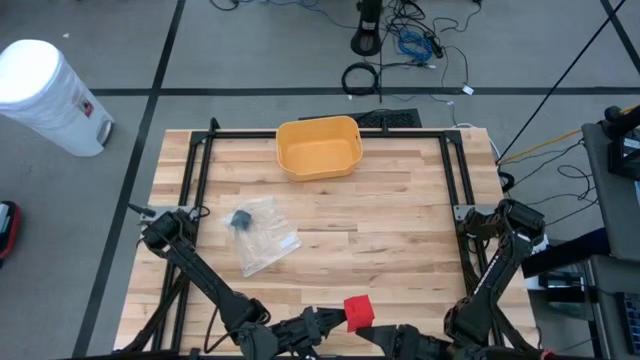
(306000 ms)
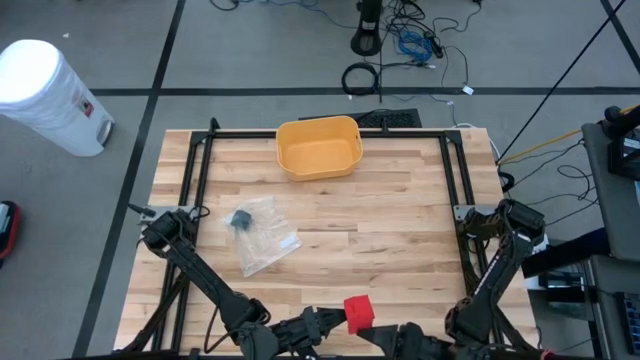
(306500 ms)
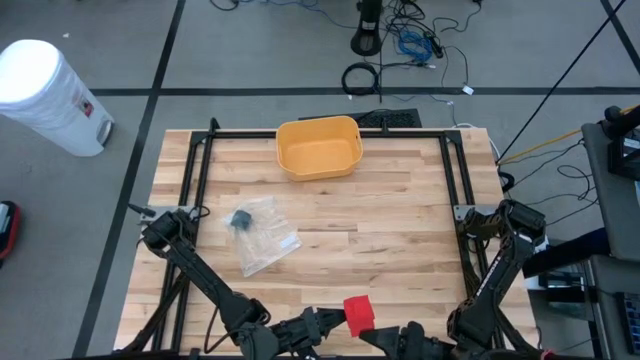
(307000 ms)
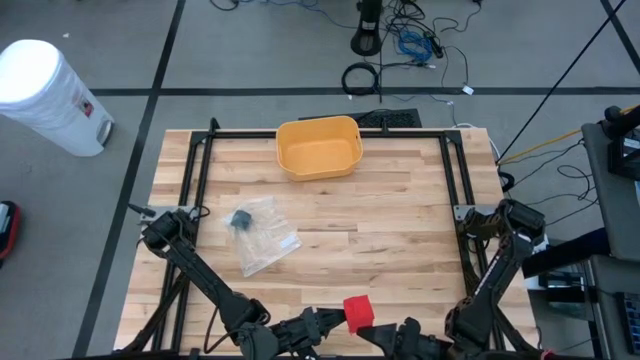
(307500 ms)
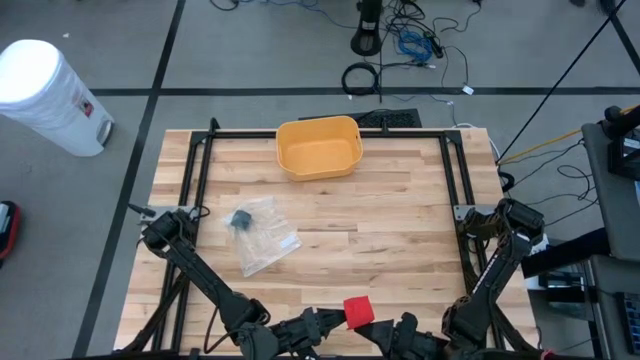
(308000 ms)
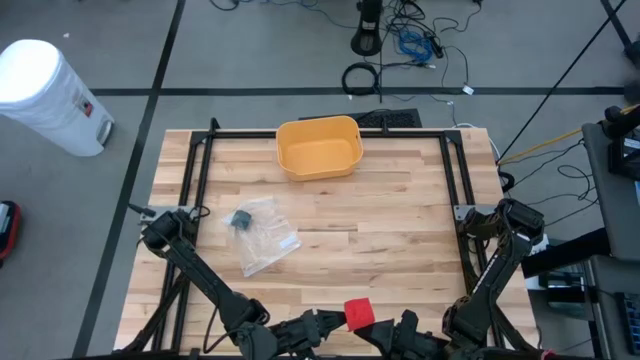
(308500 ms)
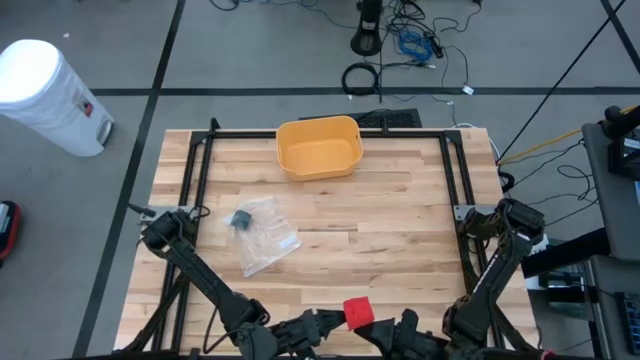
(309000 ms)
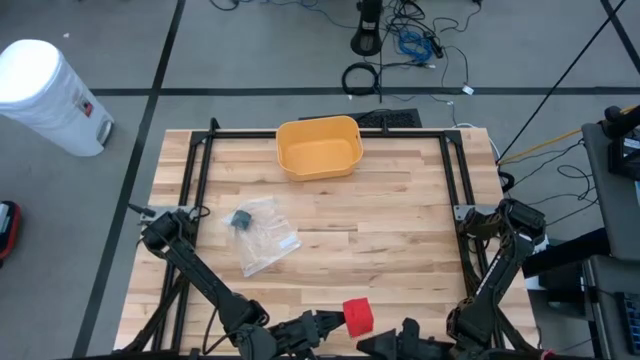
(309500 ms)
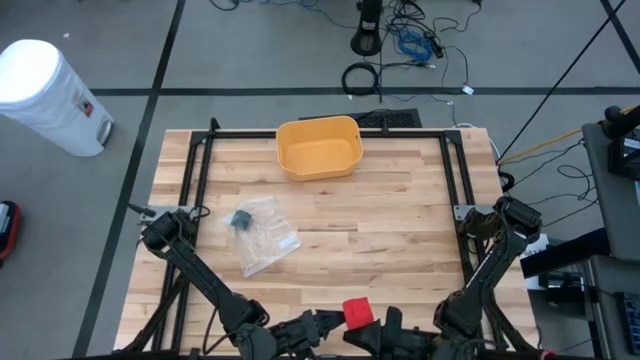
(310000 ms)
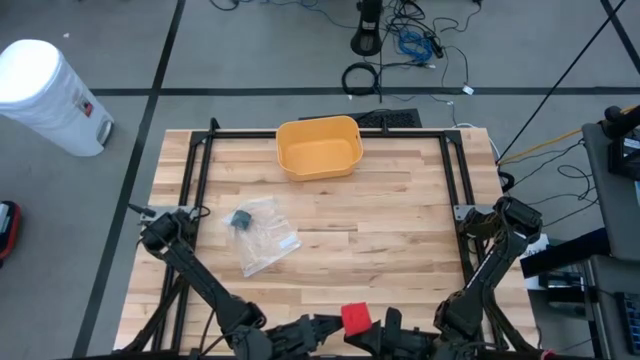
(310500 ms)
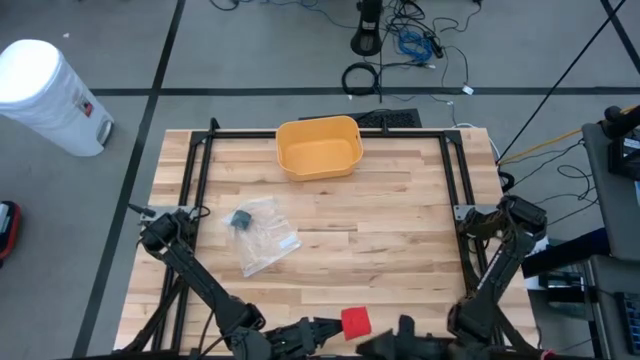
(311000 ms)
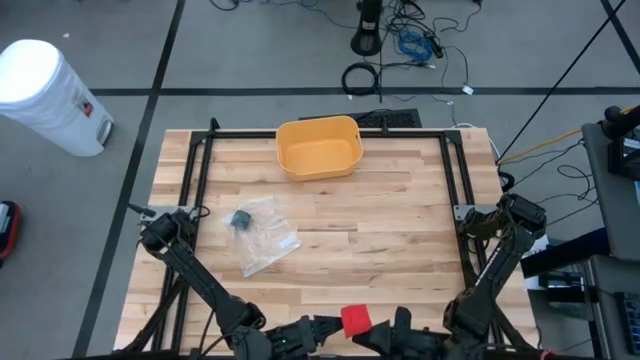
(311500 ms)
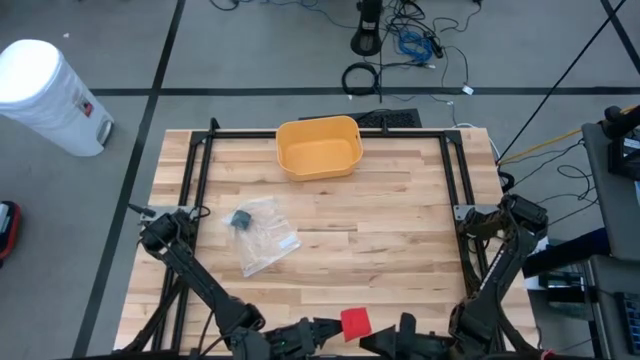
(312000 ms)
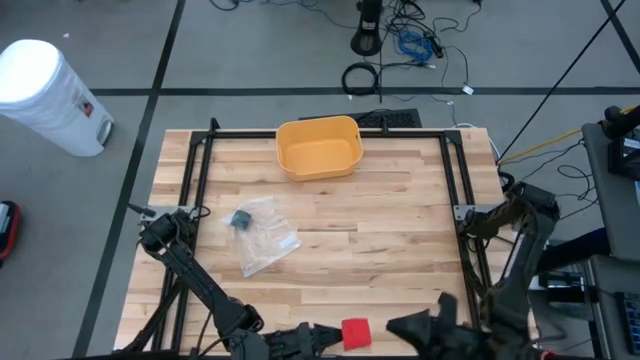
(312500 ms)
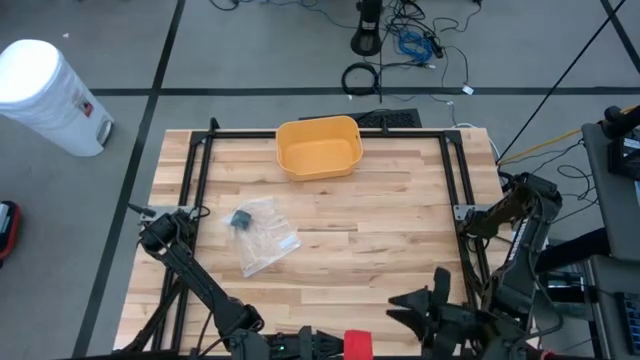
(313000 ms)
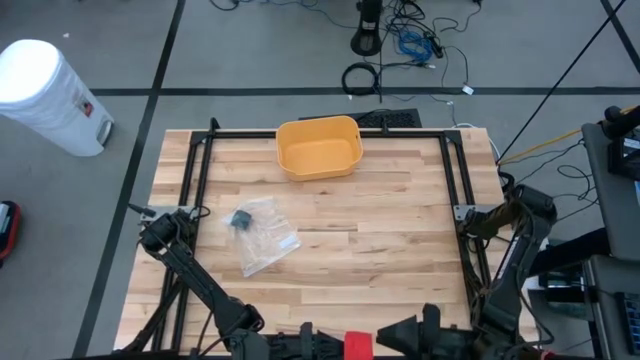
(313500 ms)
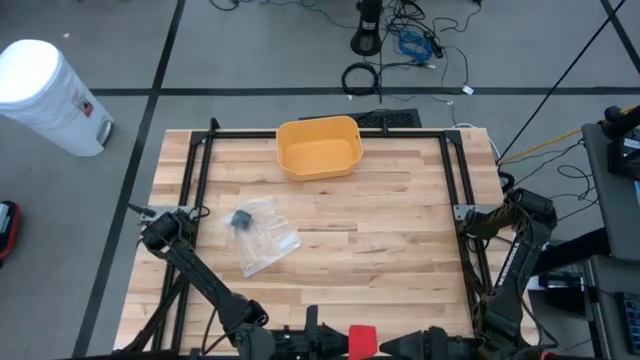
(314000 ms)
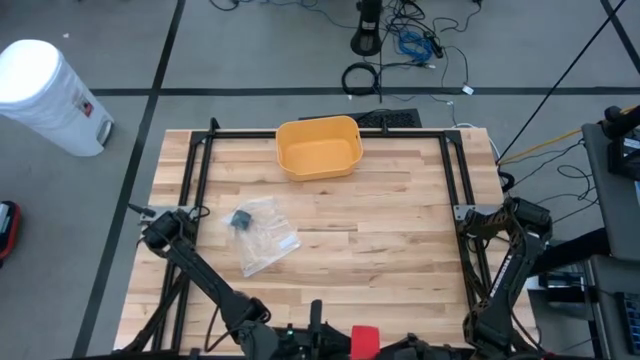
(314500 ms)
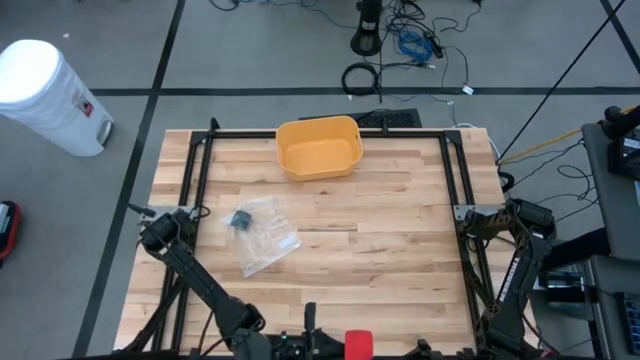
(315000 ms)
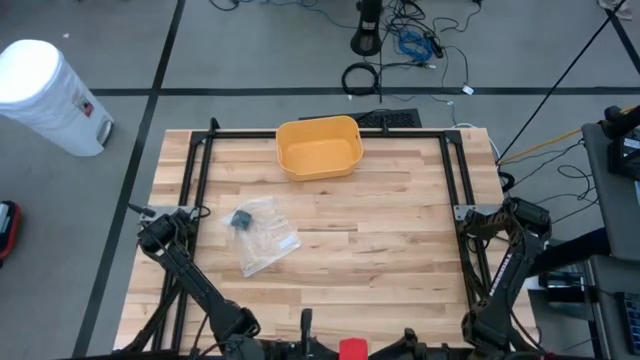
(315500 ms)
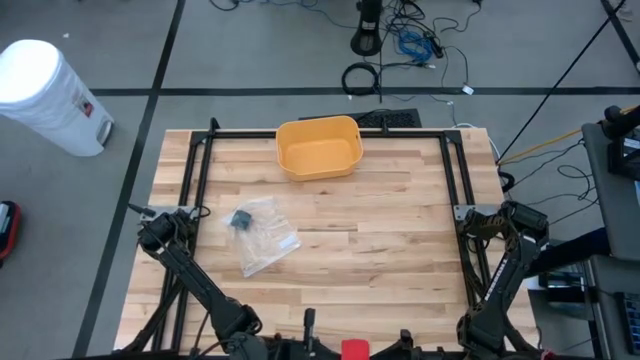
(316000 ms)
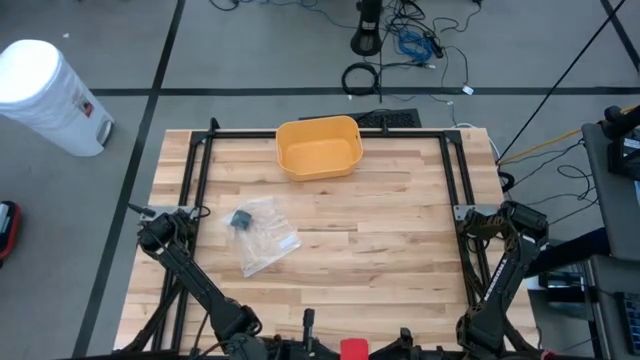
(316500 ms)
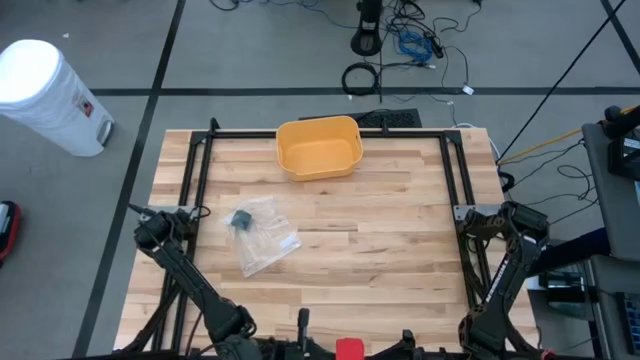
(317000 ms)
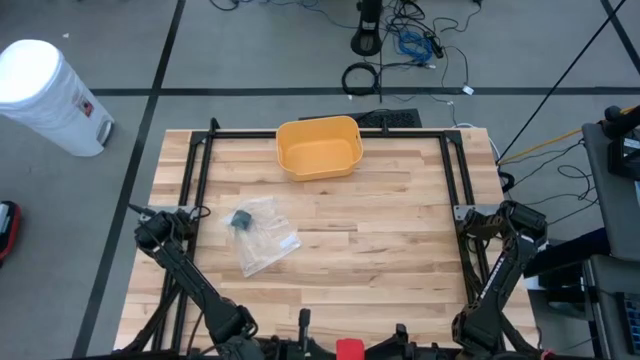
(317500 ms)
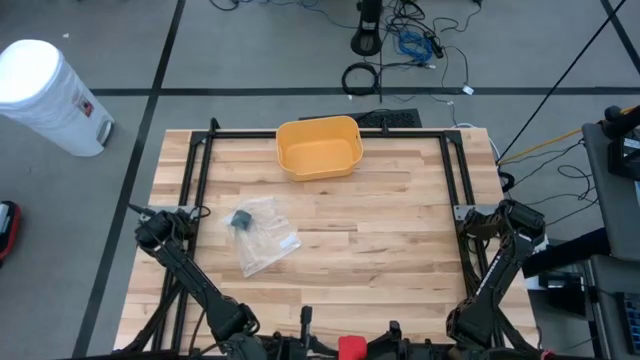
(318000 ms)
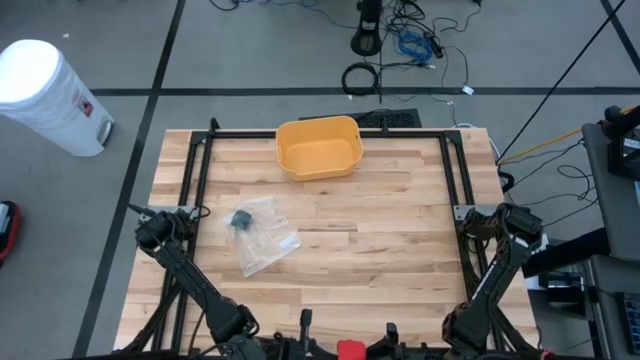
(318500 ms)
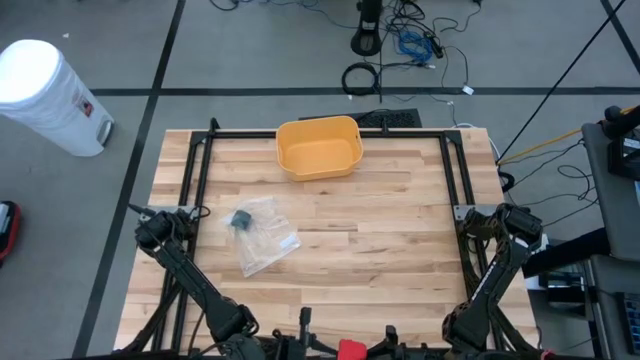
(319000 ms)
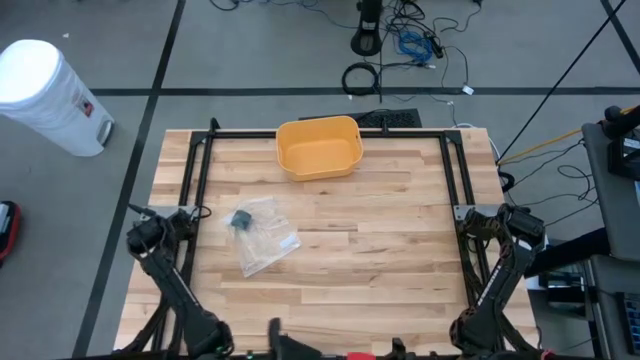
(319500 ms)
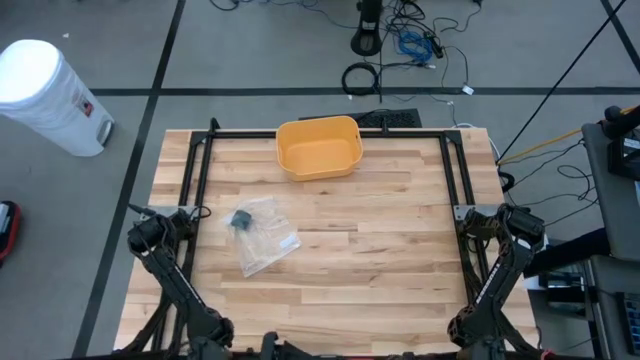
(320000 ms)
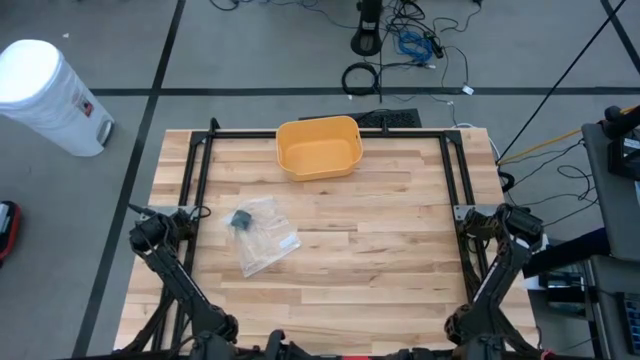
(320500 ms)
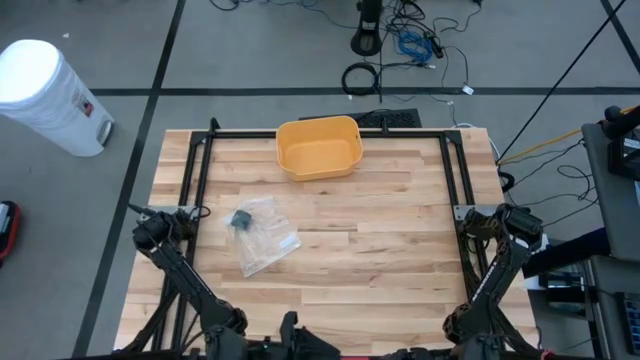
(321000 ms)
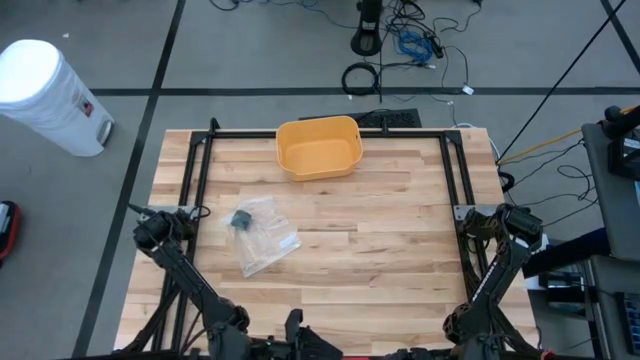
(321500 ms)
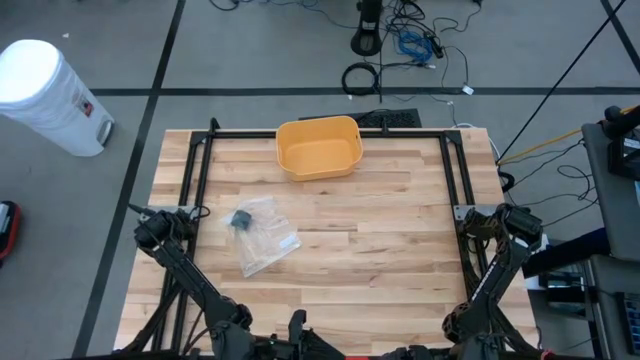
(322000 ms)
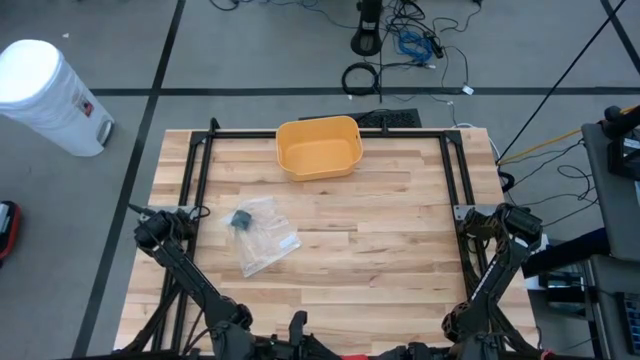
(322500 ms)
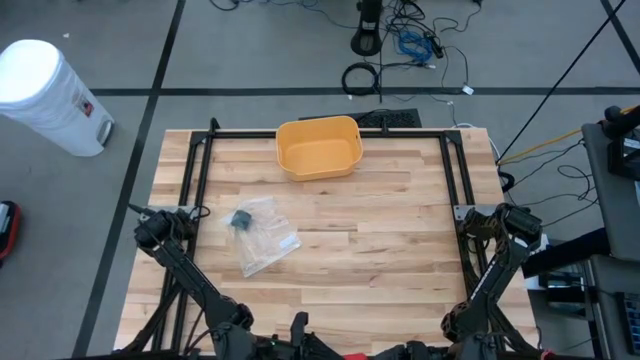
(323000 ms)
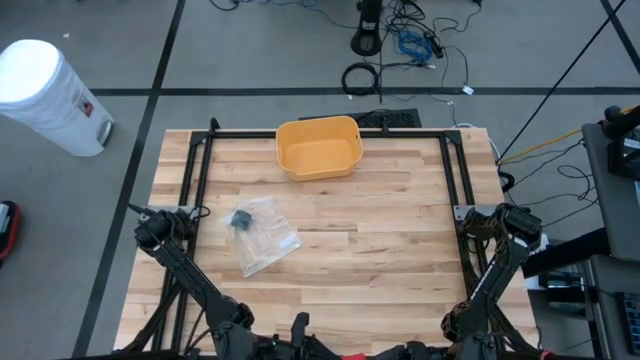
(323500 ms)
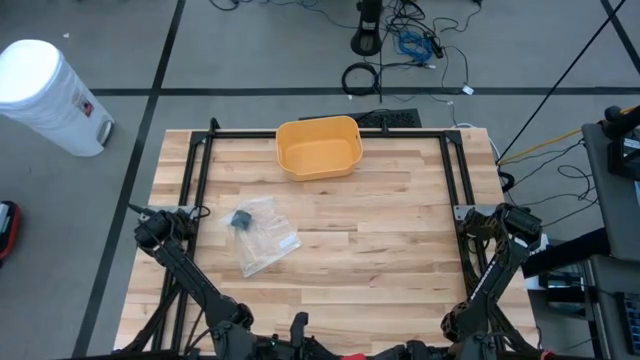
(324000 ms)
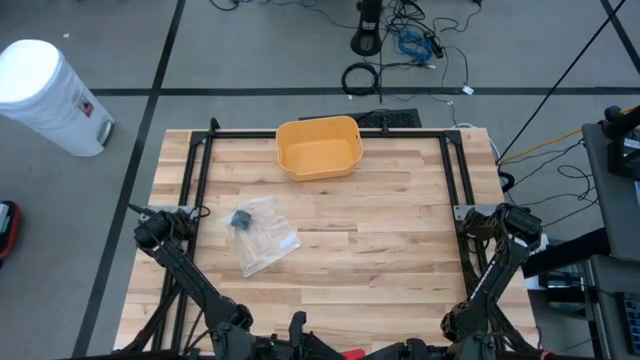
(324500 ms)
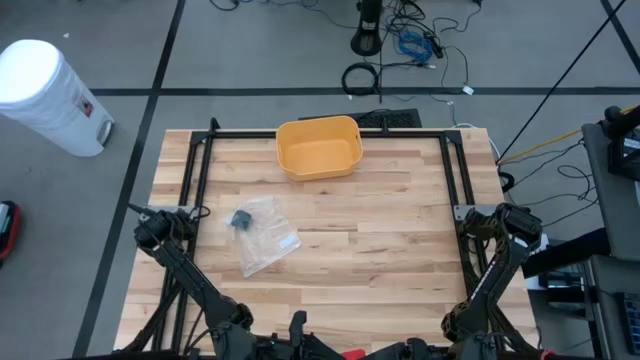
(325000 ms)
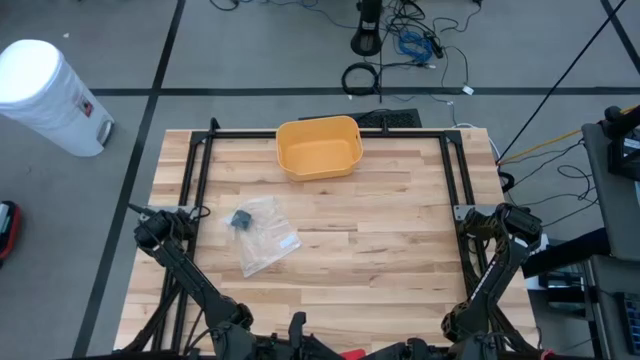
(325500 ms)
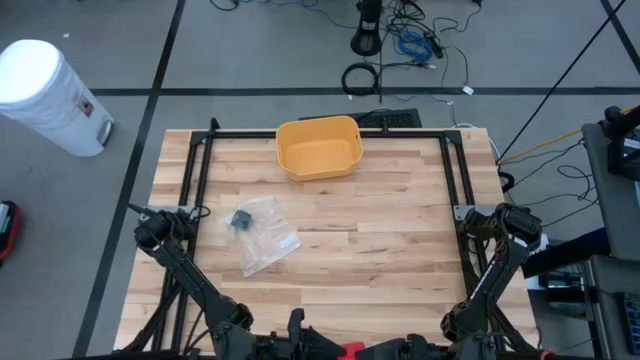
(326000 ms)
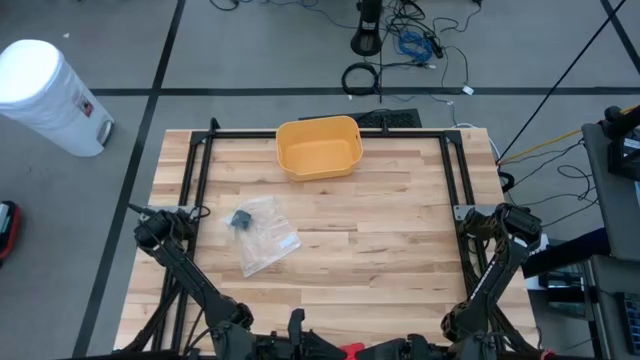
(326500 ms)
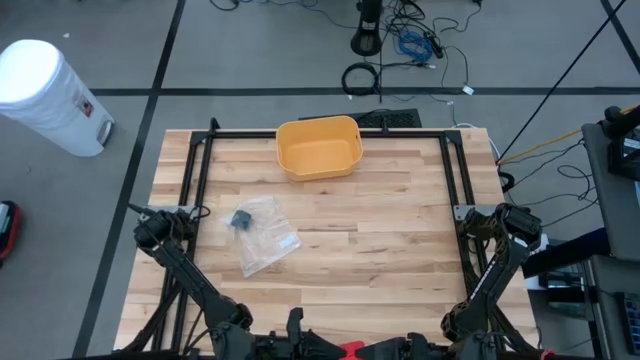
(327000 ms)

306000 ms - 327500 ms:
Task: Roll bandage
Roll the red bandage

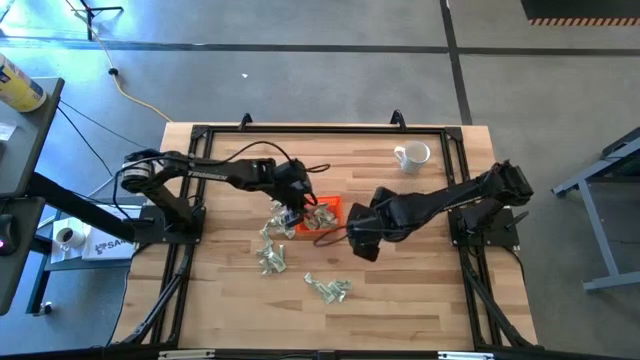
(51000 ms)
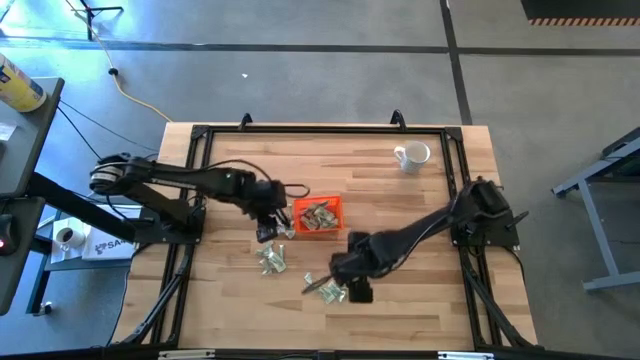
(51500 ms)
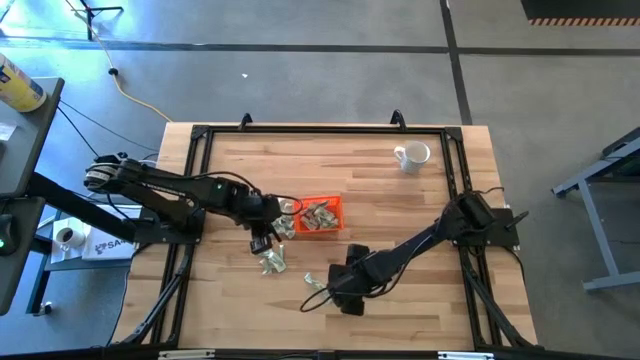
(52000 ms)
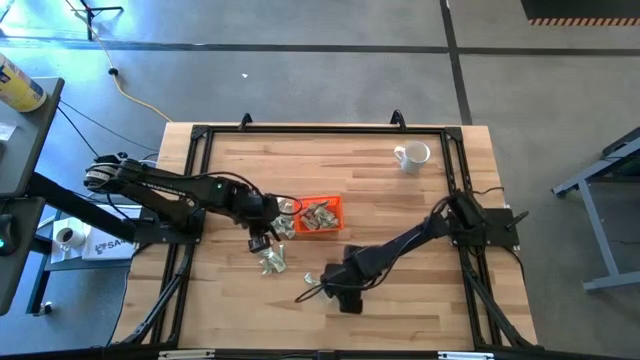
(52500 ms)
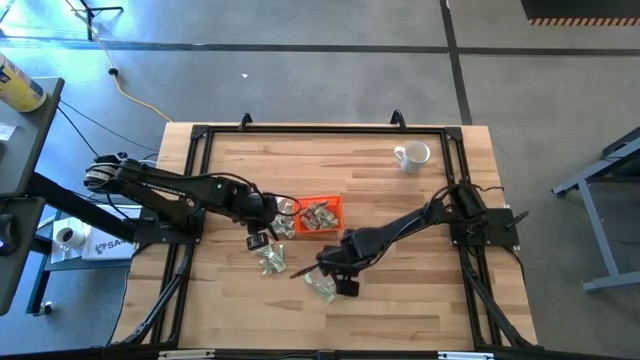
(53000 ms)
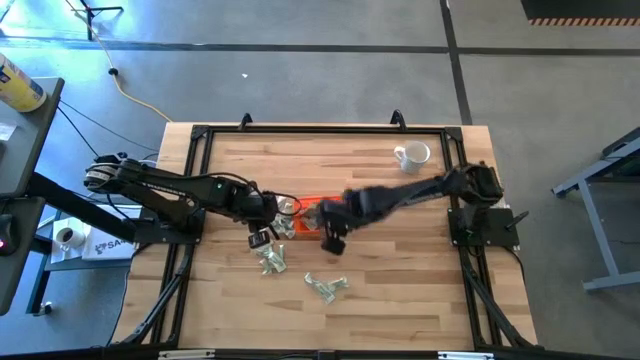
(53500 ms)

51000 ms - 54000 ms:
Task: Pick and place Stevia / Truvia into bins
Put the stevia packet into the orange bin
